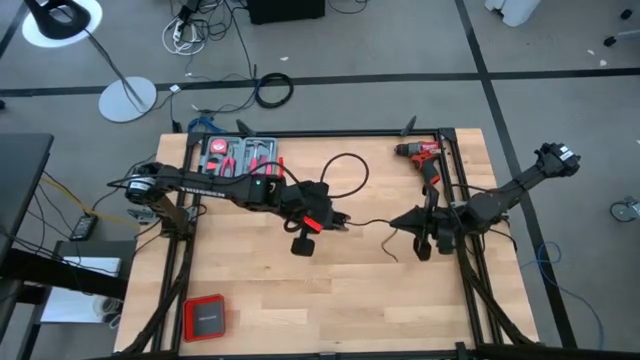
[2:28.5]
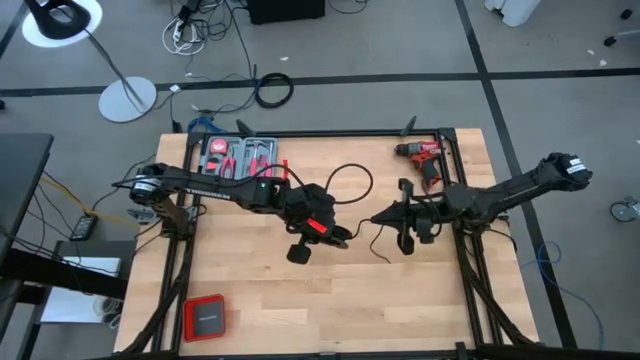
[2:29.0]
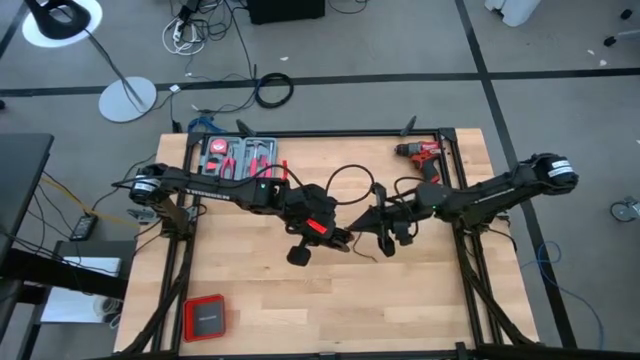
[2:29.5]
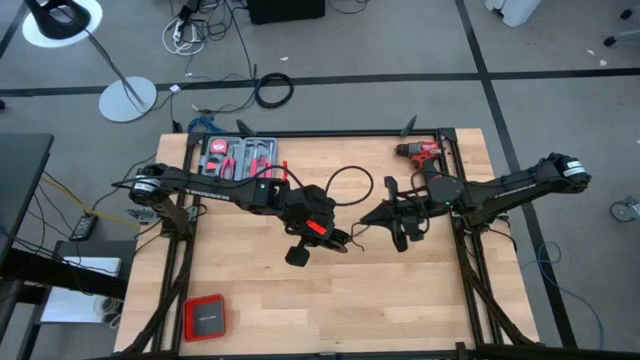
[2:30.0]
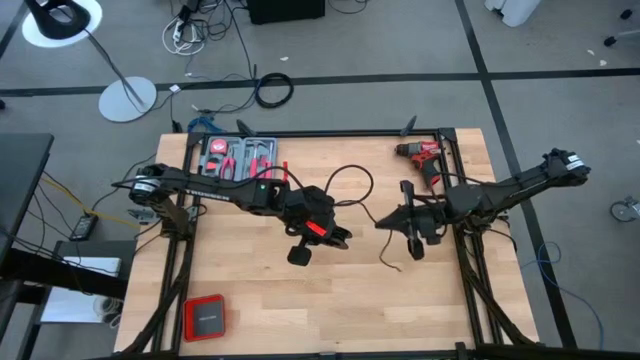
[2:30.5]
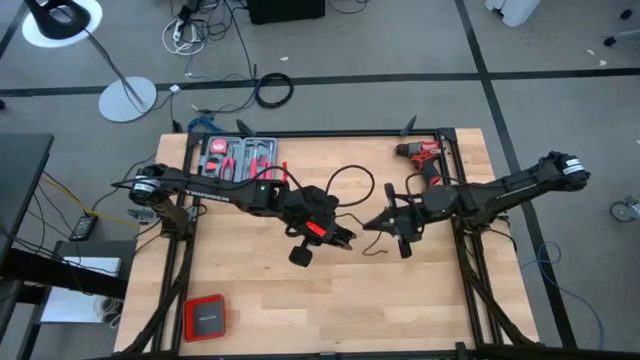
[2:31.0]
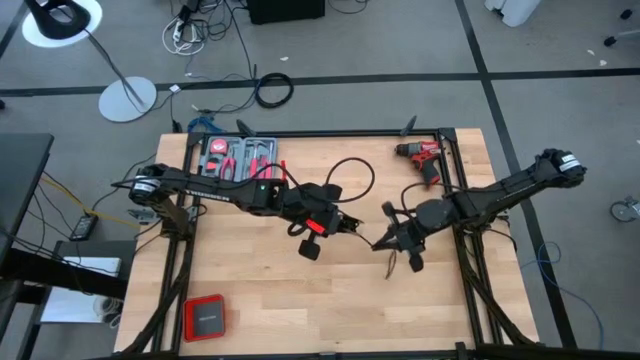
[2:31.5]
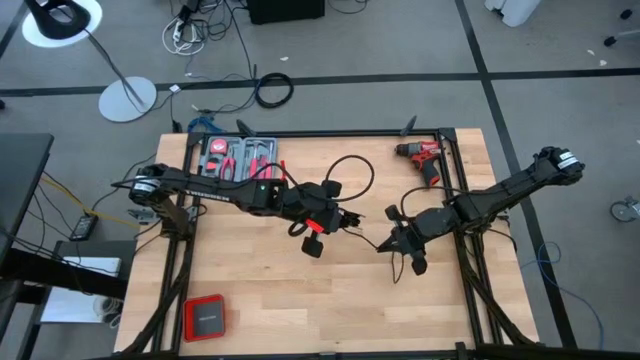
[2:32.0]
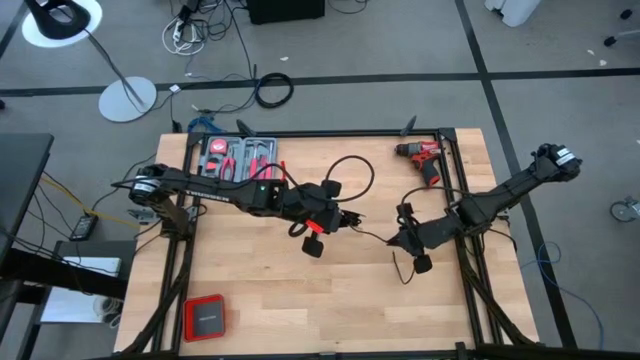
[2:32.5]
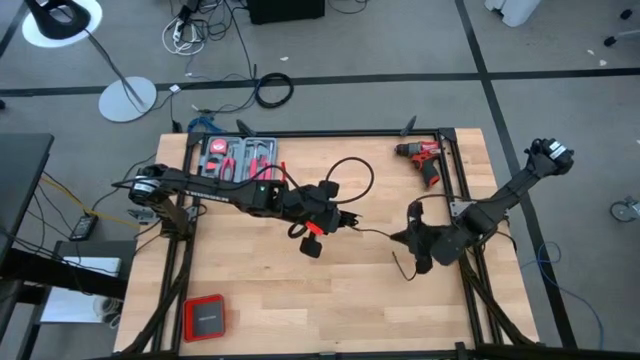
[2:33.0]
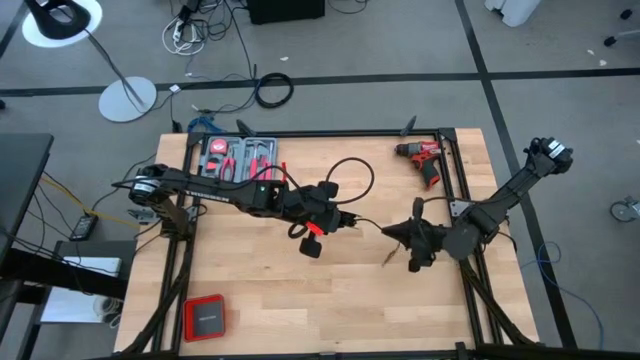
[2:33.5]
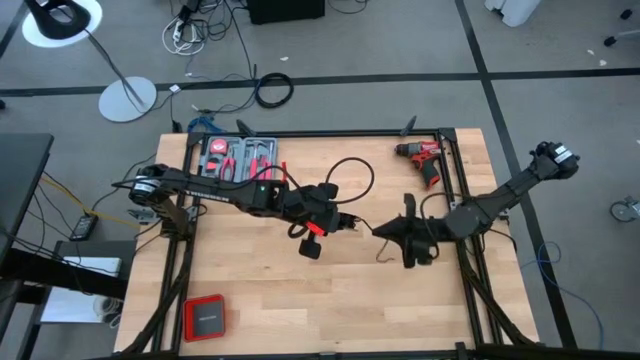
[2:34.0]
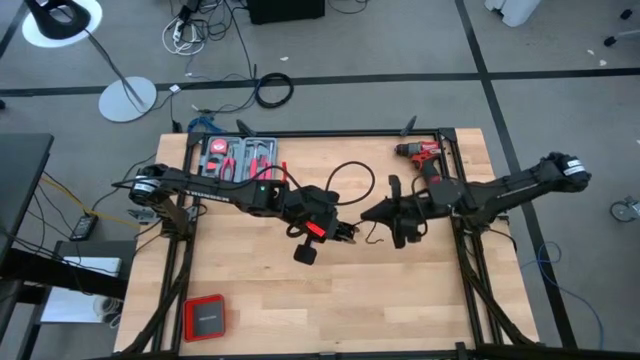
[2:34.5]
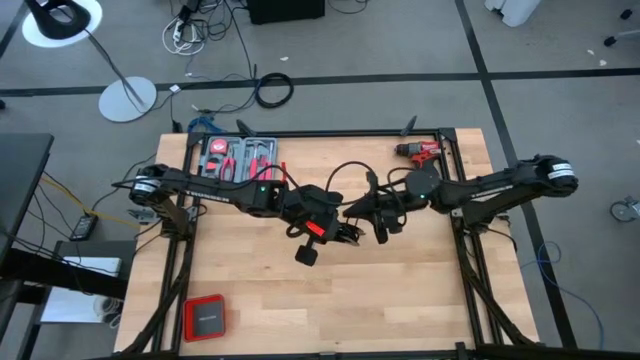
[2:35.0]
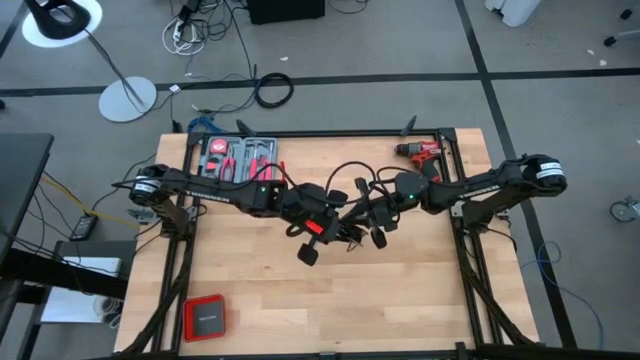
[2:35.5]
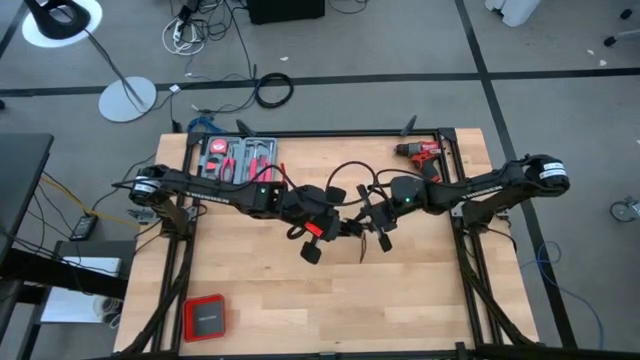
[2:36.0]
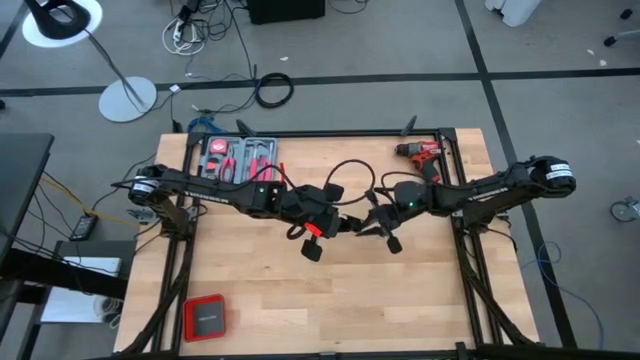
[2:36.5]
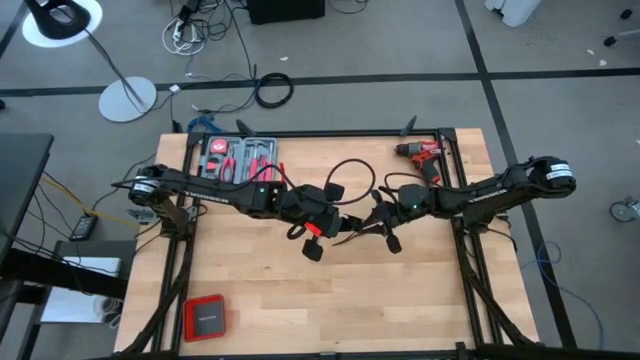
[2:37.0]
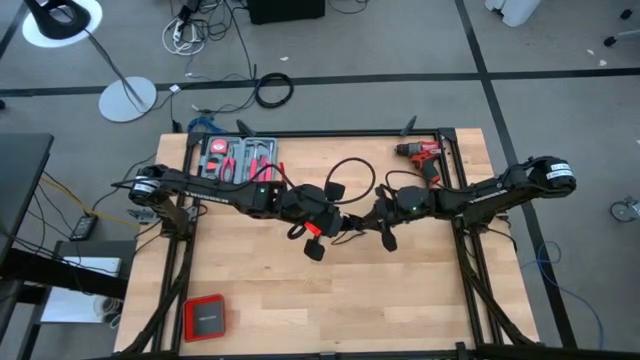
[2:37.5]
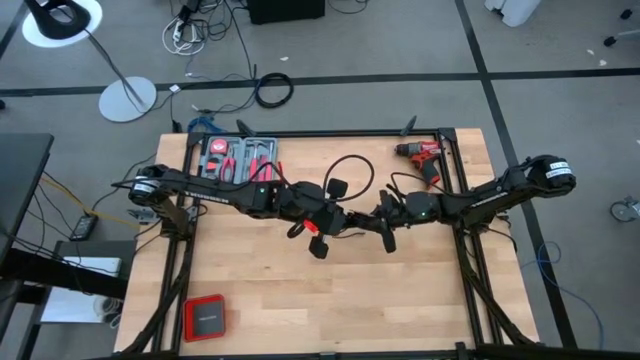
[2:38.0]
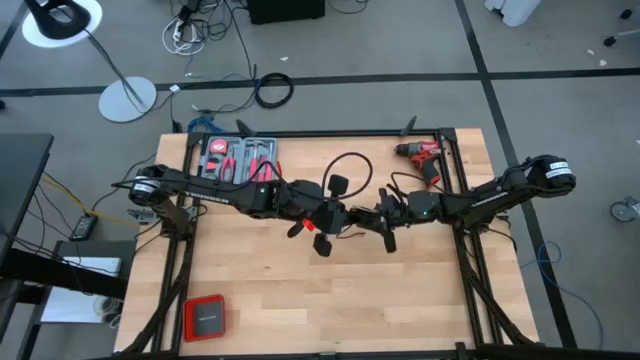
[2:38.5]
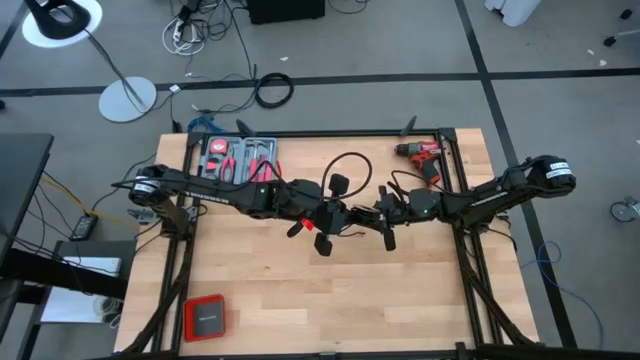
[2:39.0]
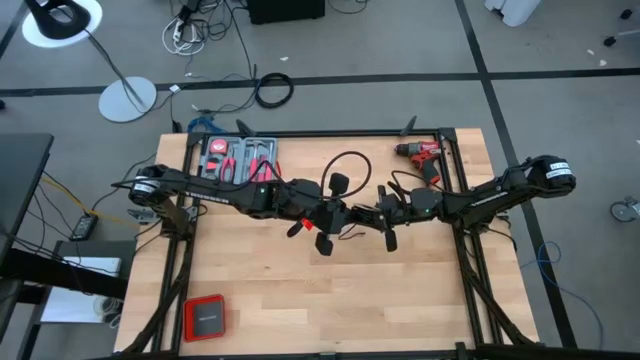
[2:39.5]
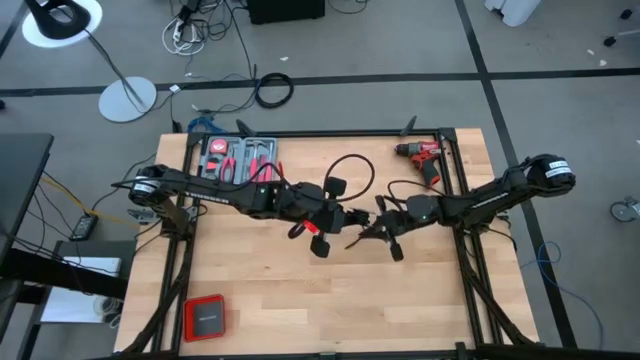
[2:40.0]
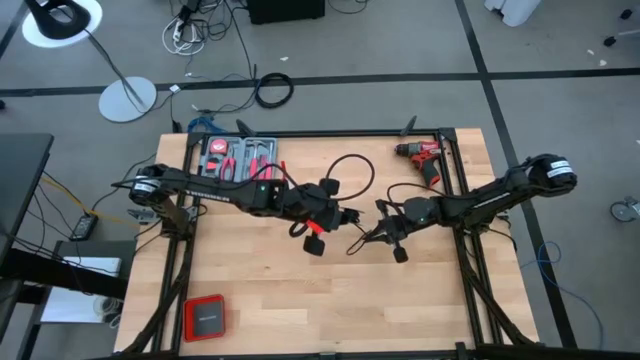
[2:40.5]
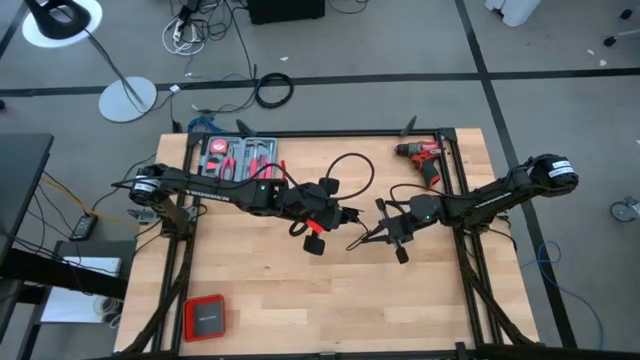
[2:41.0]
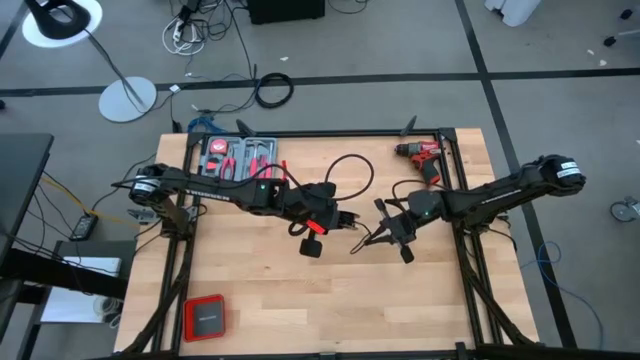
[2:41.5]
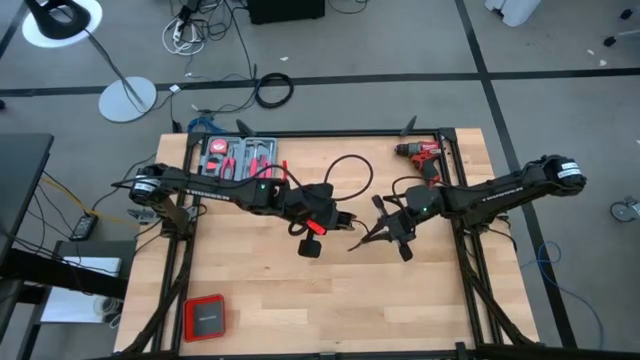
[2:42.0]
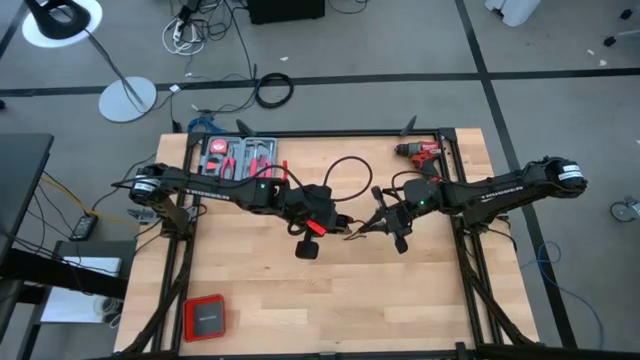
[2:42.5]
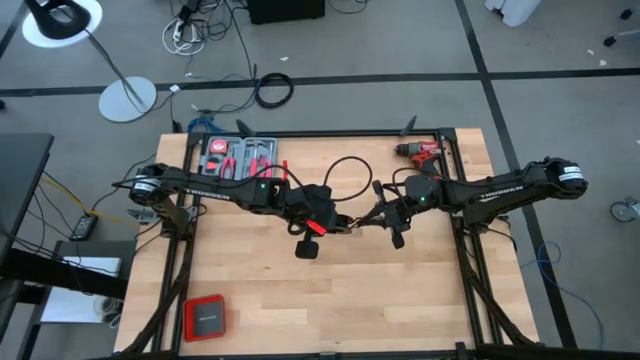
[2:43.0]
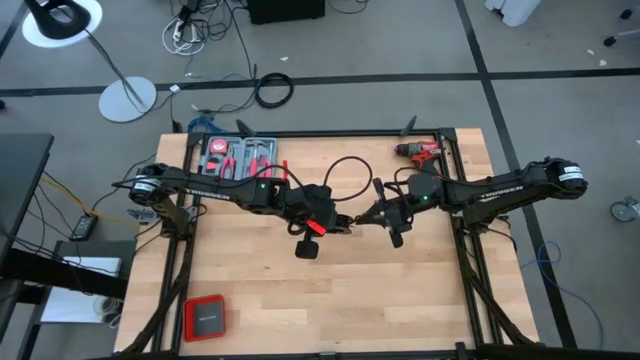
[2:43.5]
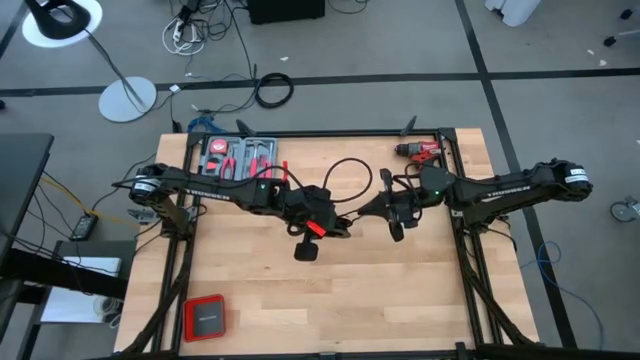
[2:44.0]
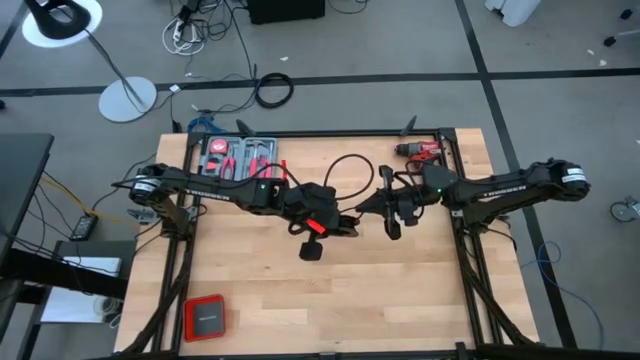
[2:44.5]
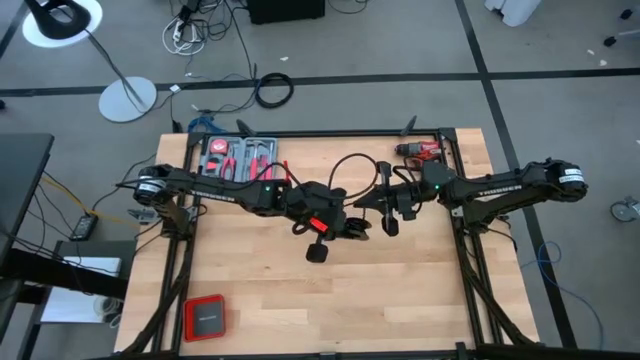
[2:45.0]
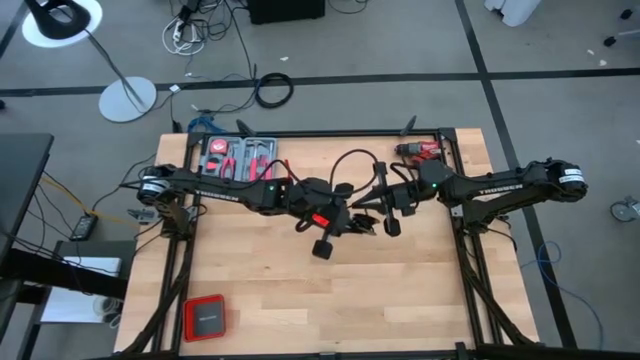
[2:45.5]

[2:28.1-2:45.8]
Task: Coil cords
Coil the black wire on the spool

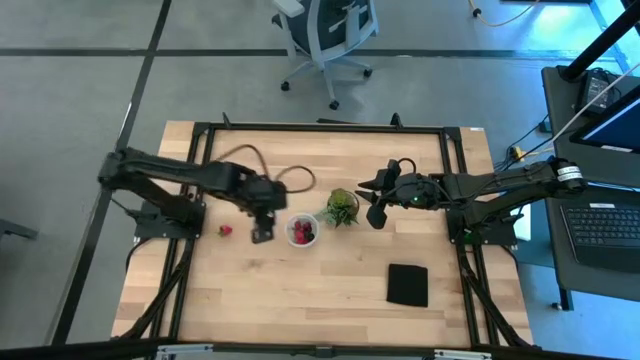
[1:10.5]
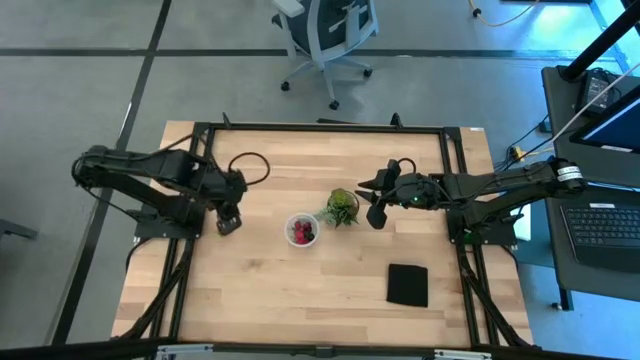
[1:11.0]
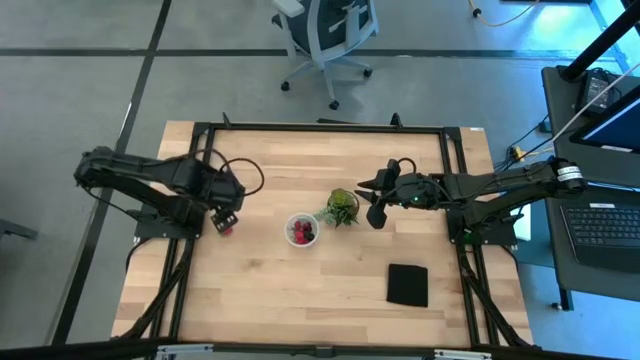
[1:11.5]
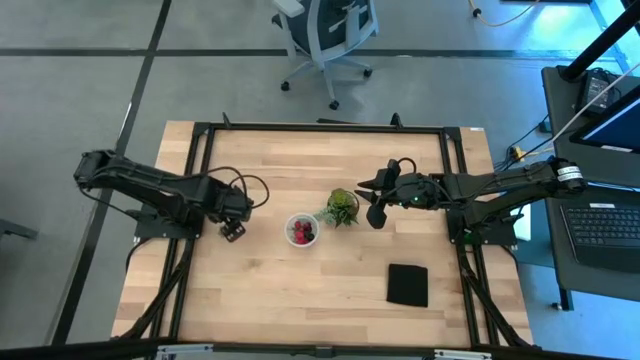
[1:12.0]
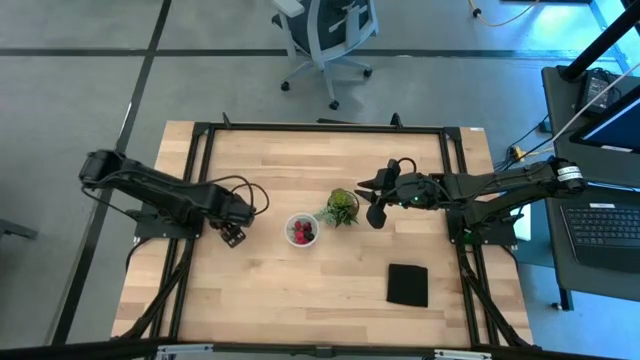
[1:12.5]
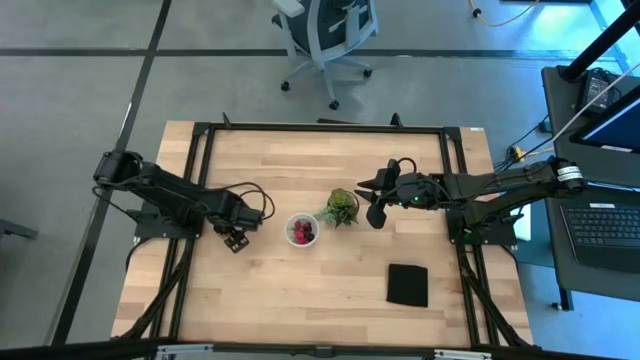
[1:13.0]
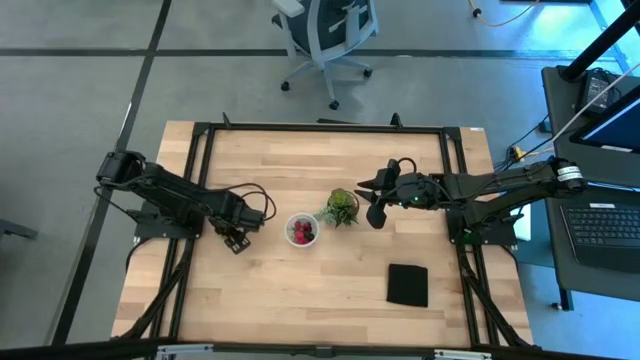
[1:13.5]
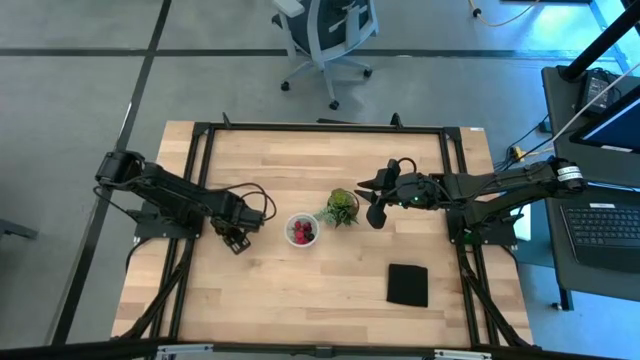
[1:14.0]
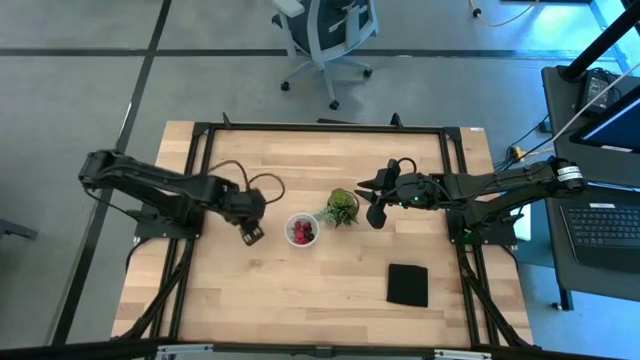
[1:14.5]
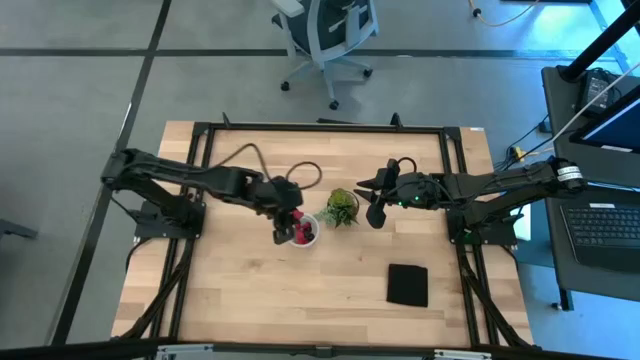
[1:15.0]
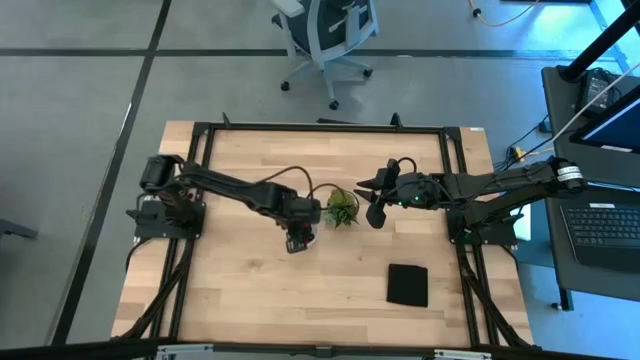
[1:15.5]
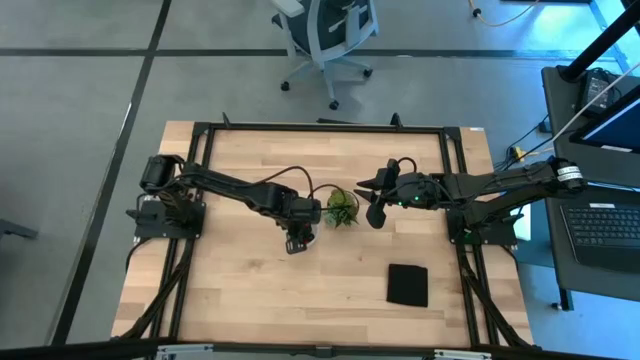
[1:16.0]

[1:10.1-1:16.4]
Task: Pick and placing Produce into tupperware
Put the strawberry into the transparent container
